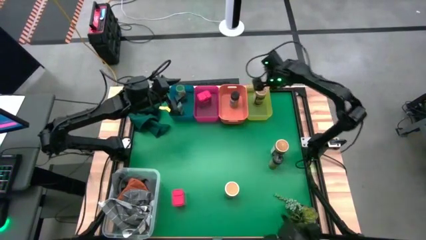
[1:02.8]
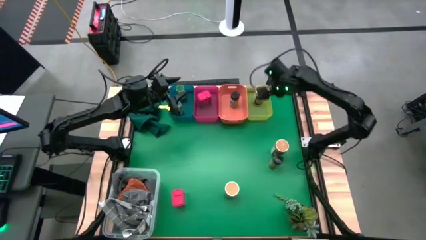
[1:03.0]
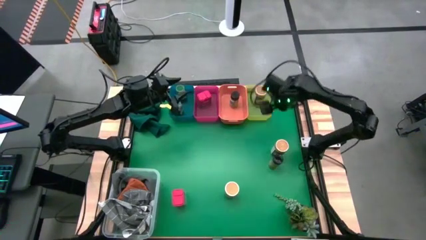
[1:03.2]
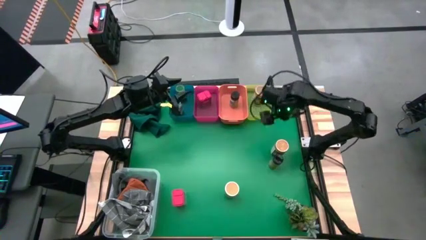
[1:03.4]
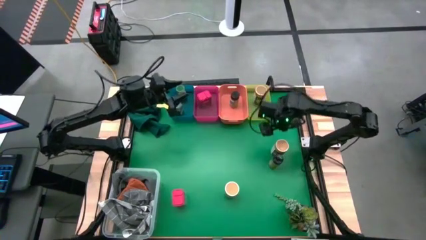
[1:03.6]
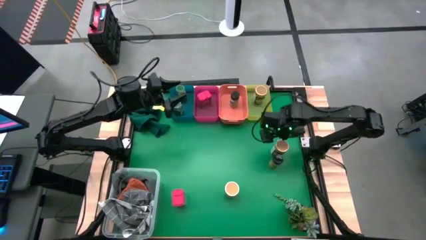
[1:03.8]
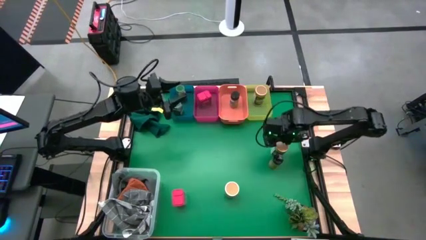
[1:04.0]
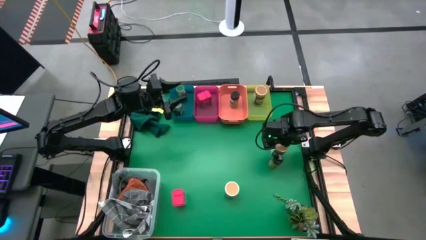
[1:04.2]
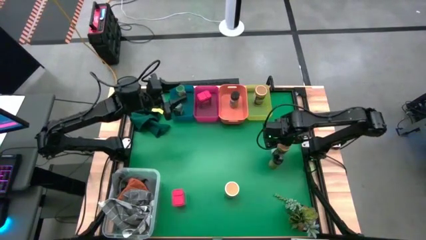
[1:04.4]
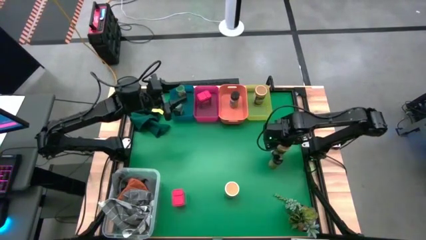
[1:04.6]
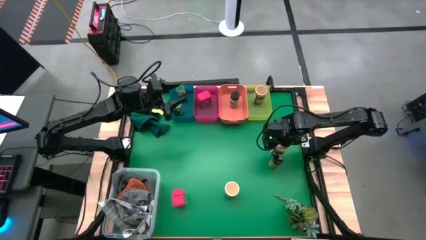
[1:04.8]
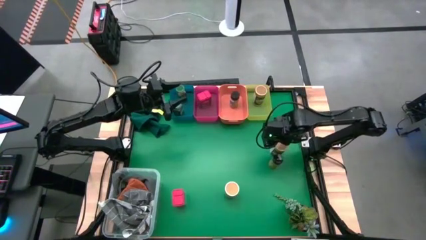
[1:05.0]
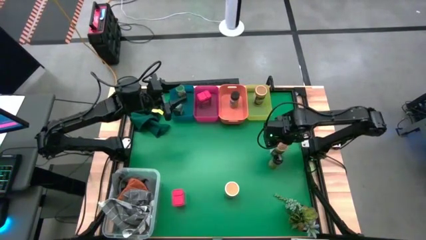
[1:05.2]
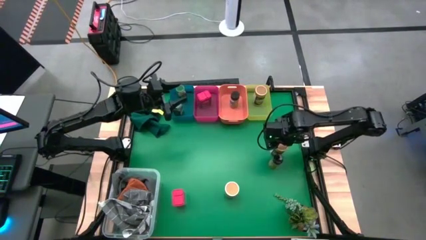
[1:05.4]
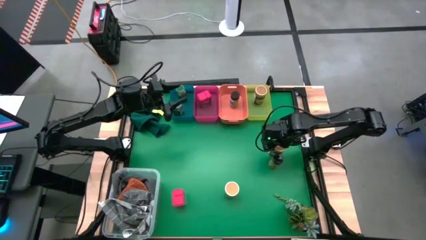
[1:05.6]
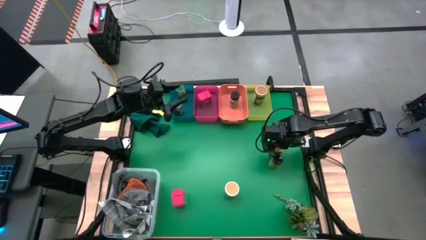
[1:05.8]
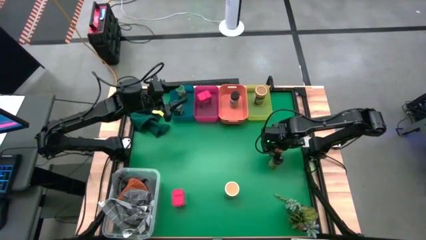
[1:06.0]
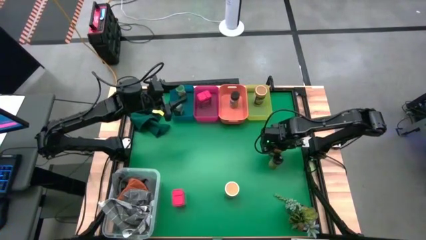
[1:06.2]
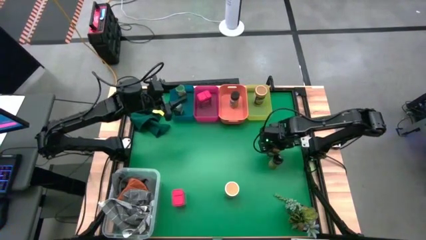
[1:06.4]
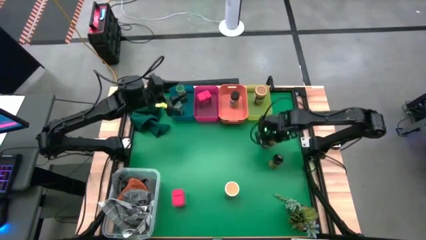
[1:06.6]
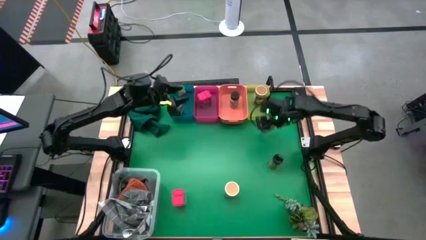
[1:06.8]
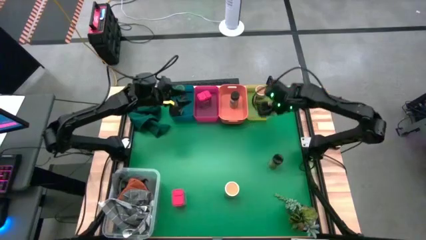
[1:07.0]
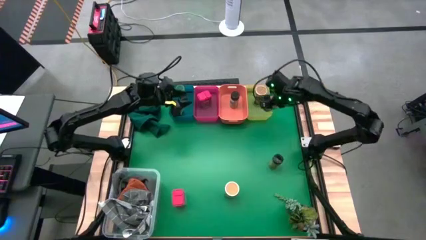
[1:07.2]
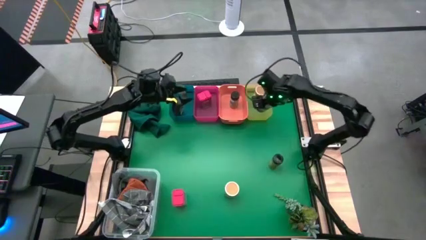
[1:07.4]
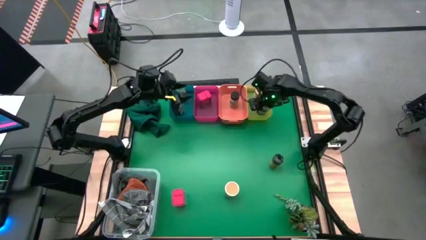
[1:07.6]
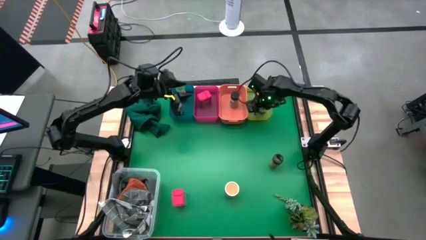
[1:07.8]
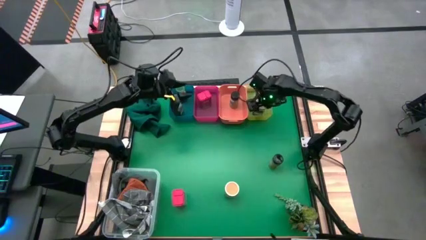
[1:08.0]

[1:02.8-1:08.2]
Task: Sort spices by type
Put the top gold spice bottle into the yellow bin

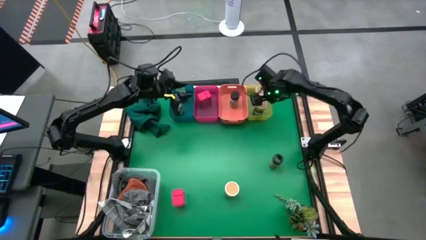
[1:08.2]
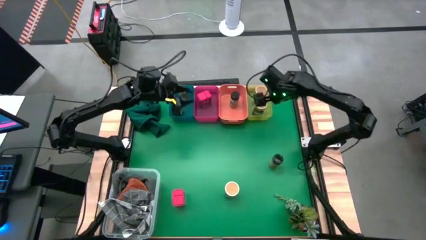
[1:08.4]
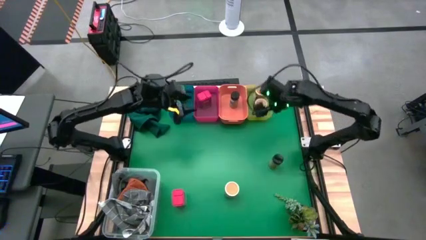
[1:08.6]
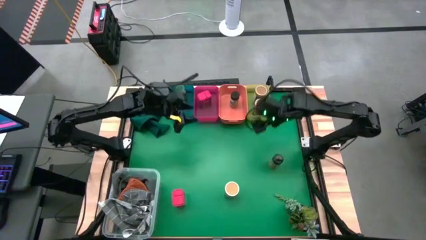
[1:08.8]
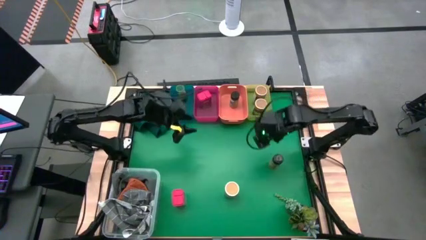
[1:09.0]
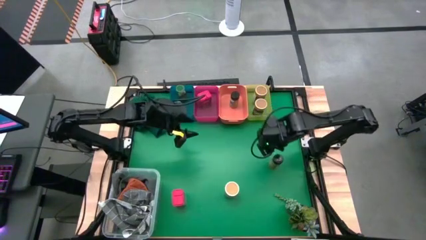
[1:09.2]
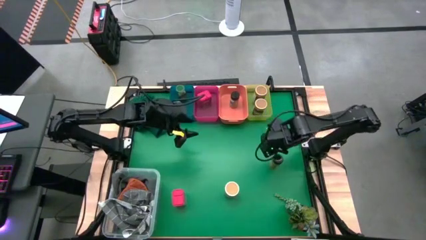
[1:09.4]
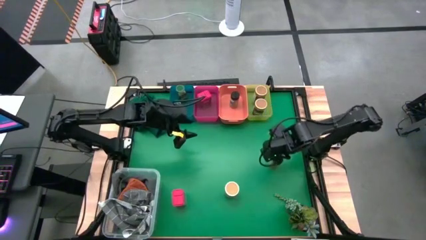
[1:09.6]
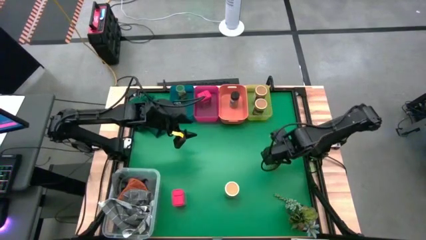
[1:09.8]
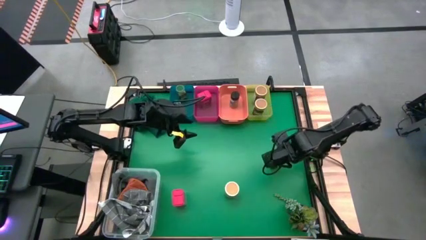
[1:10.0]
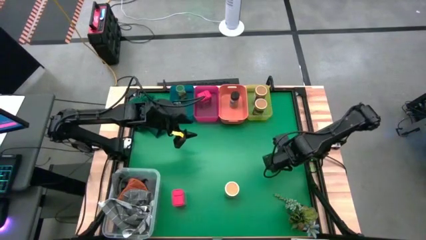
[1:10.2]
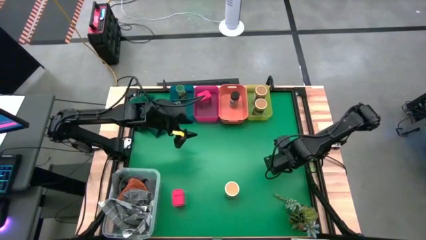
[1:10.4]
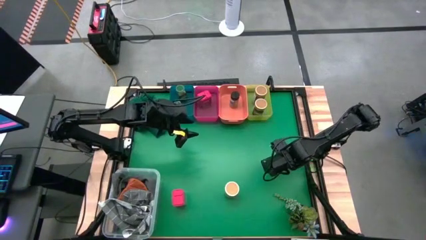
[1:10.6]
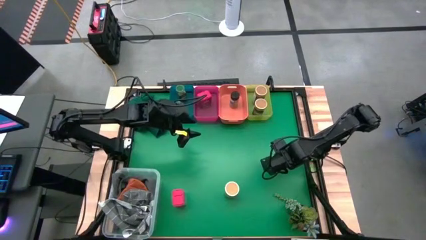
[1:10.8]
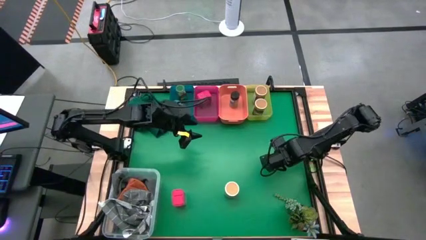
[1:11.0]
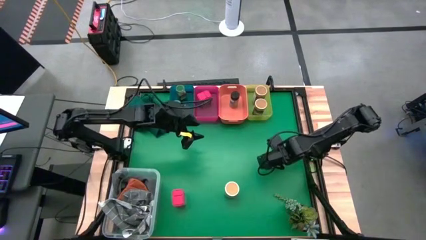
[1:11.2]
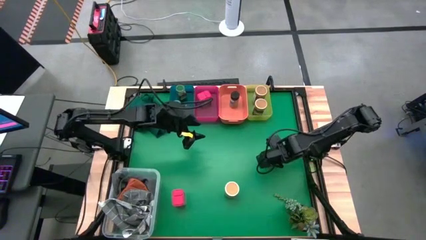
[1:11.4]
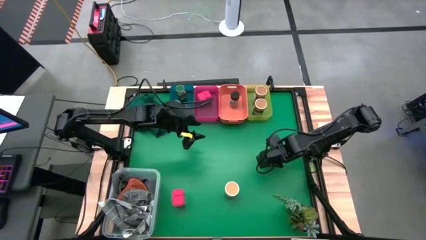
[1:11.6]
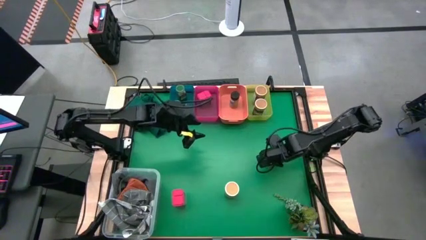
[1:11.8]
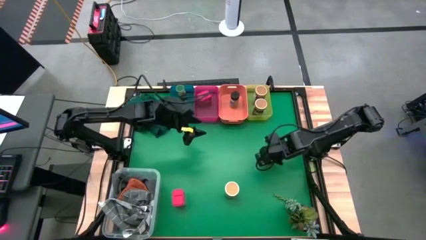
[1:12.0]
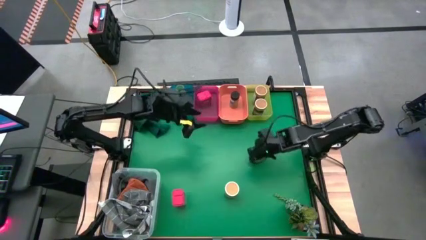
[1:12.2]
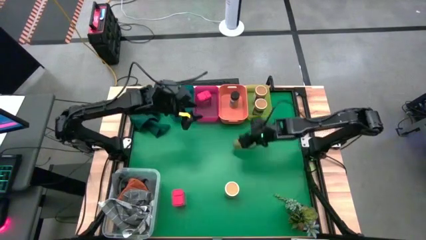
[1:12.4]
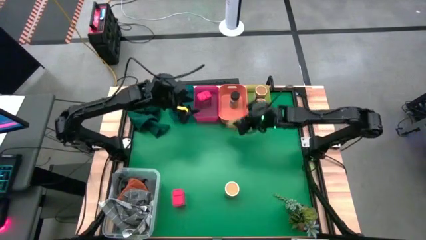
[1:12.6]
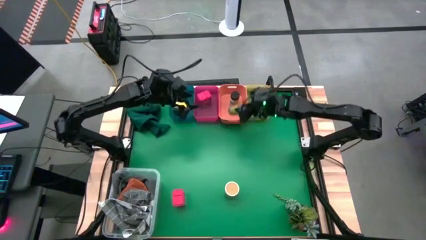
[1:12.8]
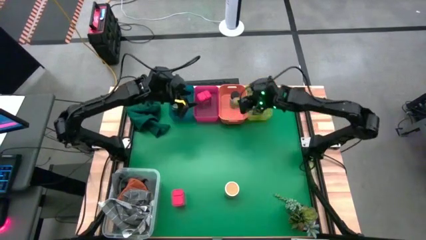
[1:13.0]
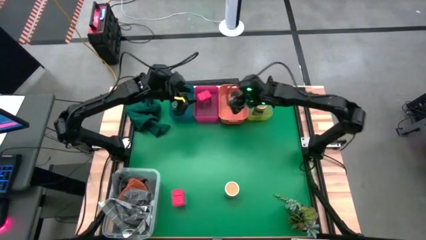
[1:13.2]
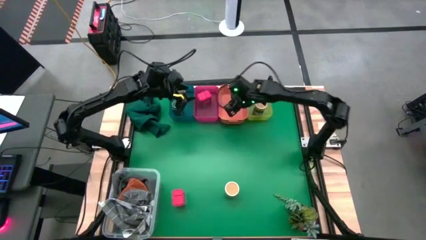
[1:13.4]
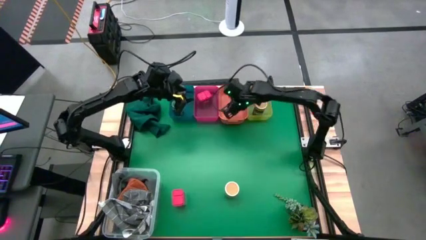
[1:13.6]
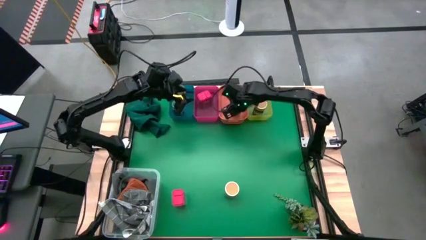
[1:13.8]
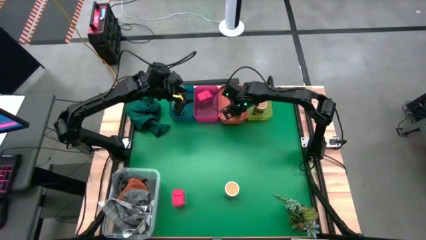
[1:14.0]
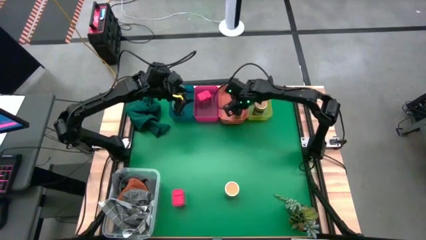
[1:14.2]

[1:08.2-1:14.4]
Put the black spice bottle into the orange bin
